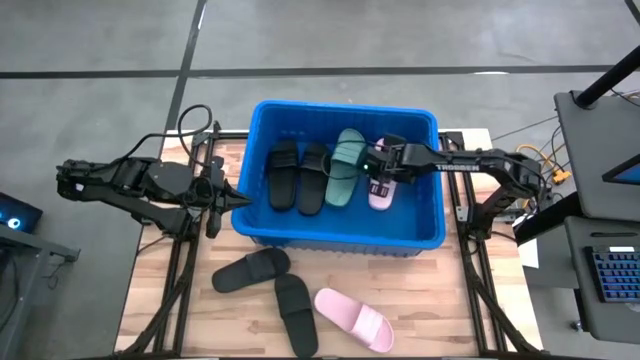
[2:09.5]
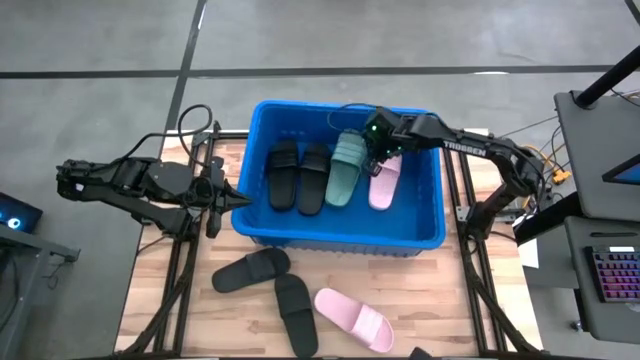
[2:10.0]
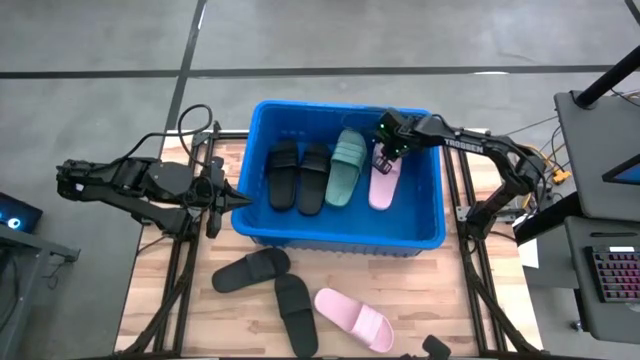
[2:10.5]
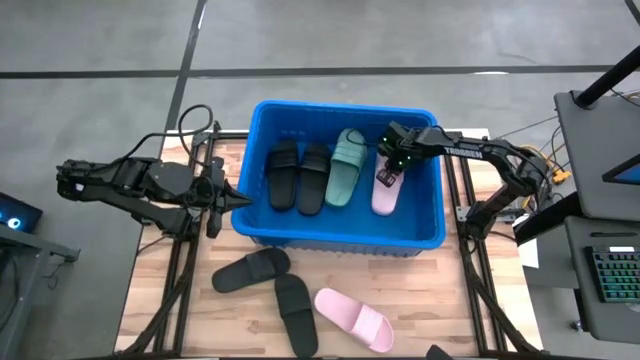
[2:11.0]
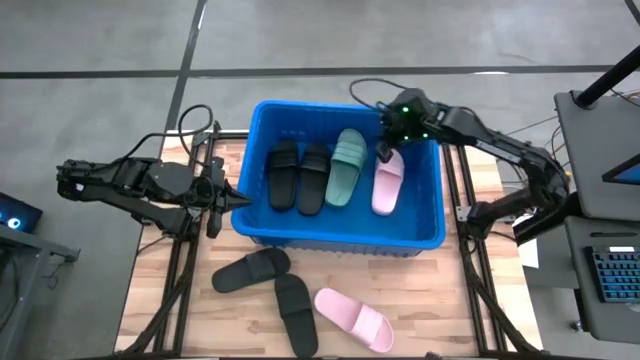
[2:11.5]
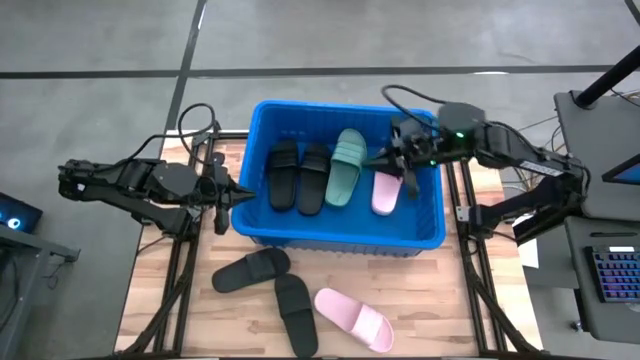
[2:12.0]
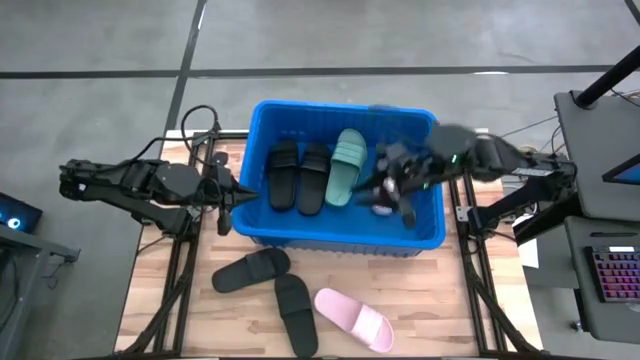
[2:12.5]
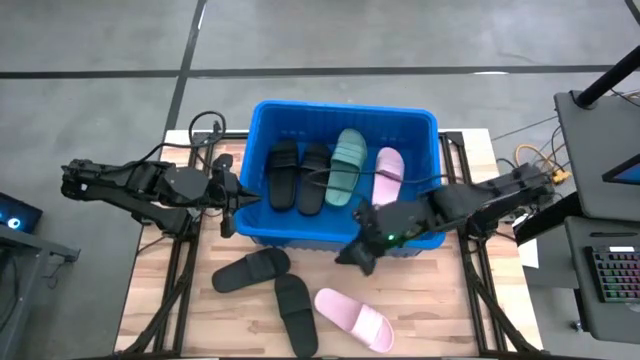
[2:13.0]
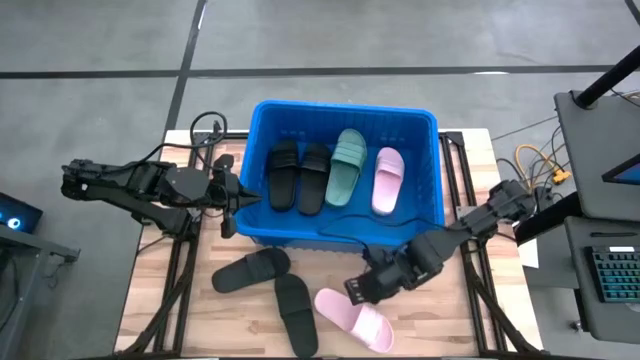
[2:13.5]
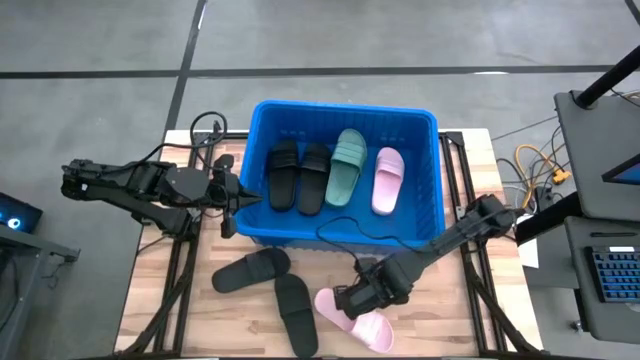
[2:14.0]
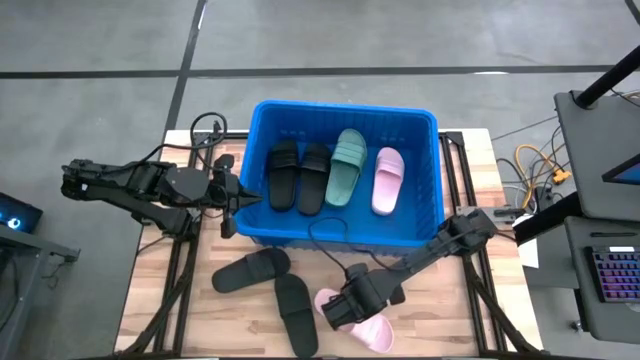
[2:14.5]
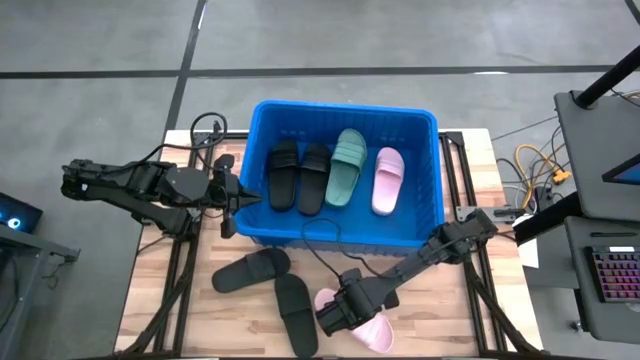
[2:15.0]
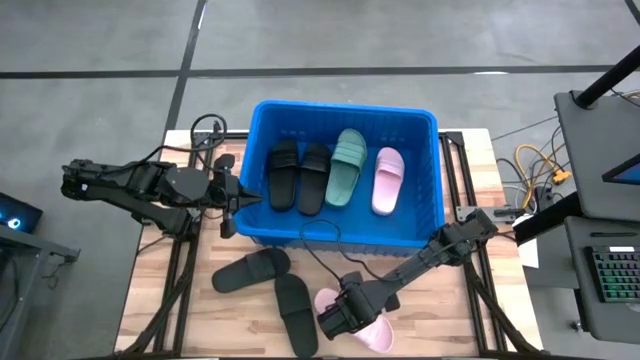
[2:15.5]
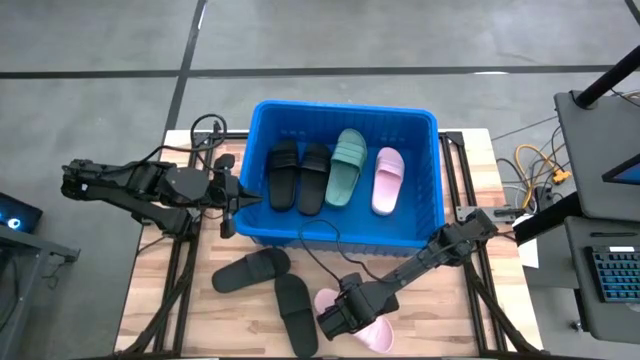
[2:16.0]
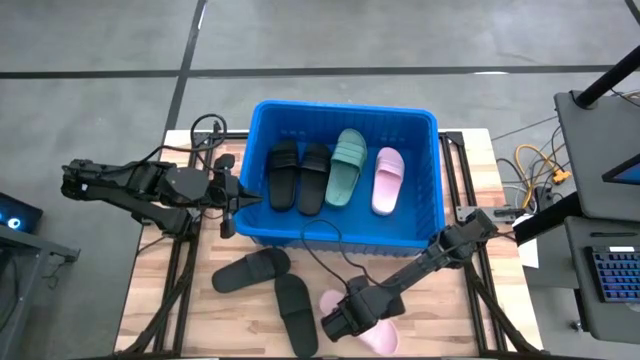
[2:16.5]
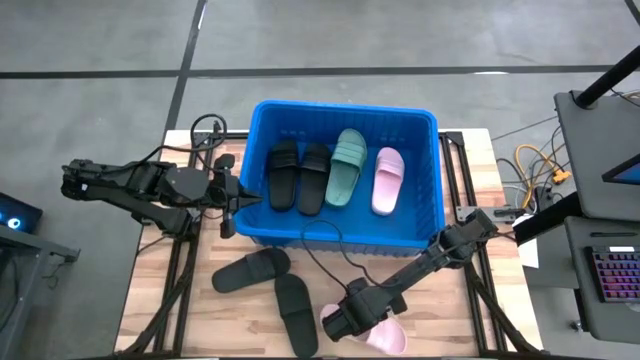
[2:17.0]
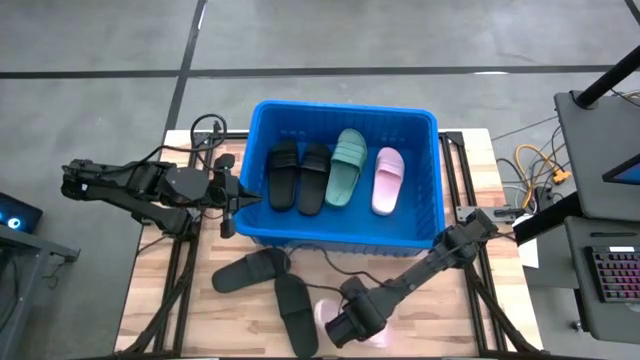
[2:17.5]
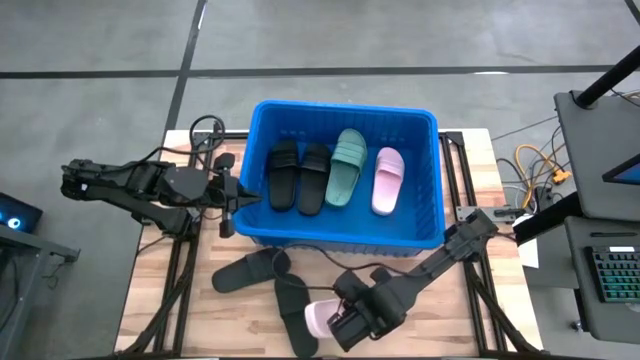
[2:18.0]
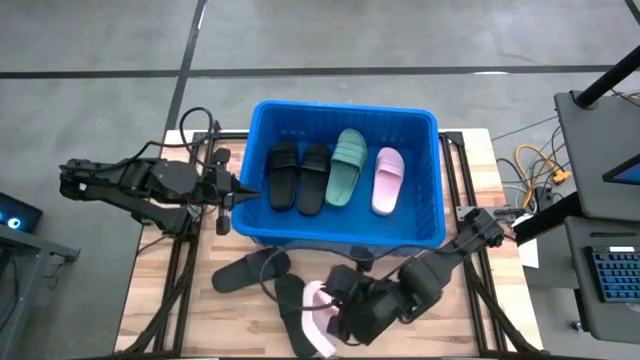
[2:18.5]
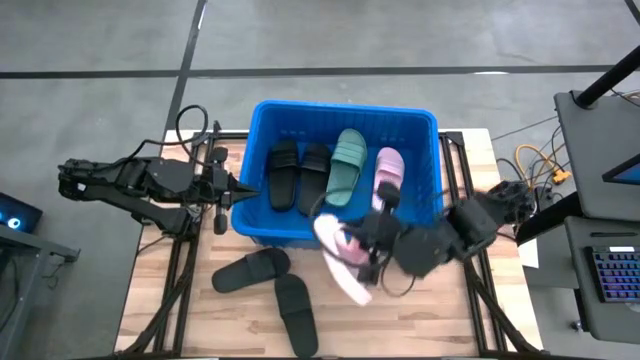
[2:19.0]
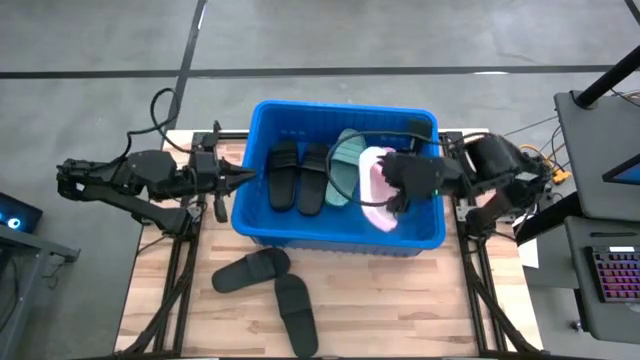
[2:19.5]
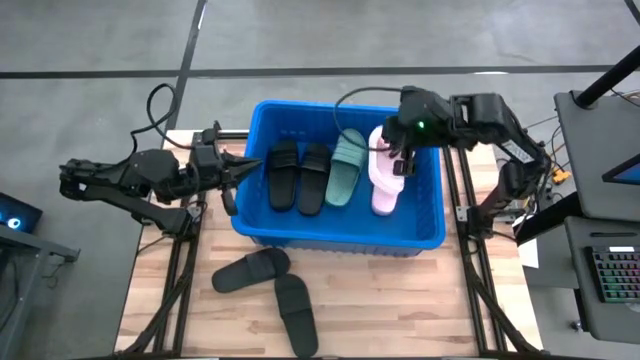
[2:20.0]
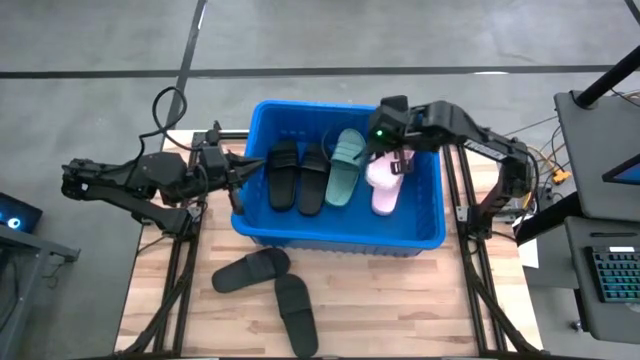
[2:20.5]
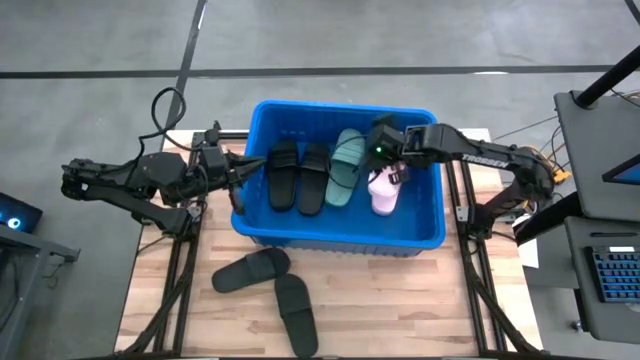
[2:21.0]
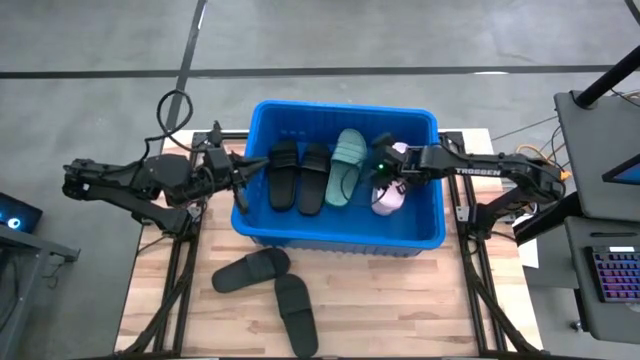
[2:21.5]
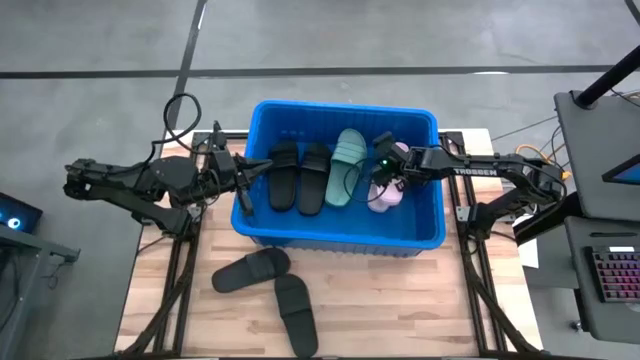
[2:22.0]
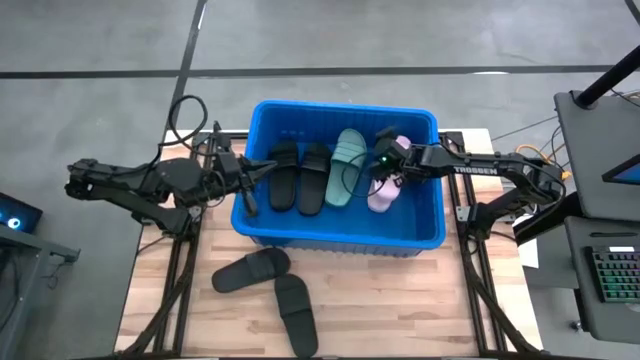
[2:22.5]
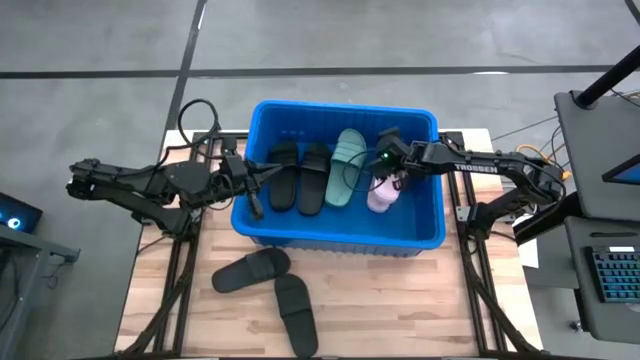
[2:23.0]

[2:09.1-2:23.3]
Task: Pick and place slides into bin
Stack the pink slide on top of the pink slide into the blue bin

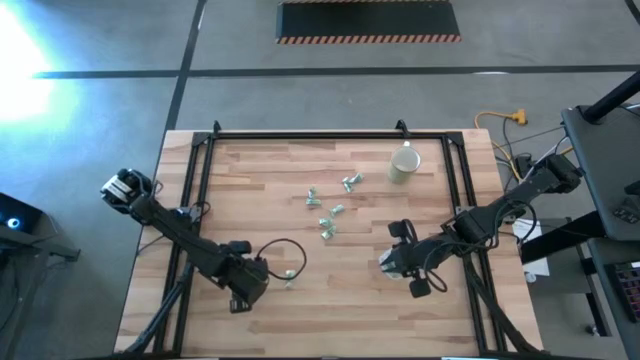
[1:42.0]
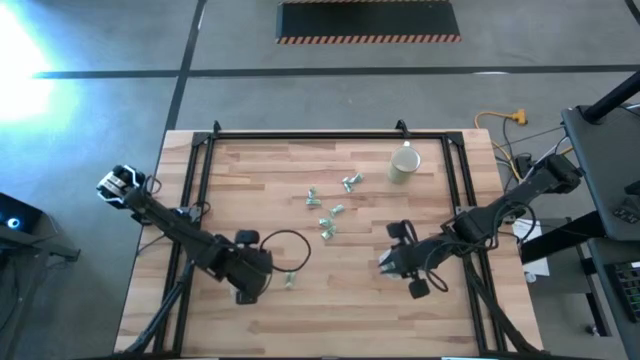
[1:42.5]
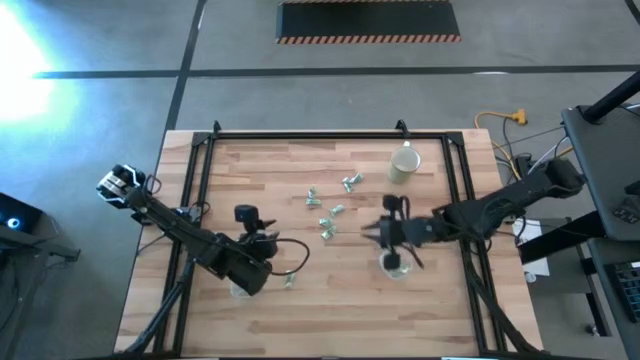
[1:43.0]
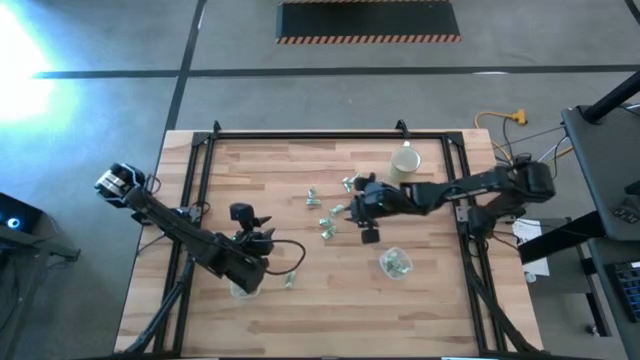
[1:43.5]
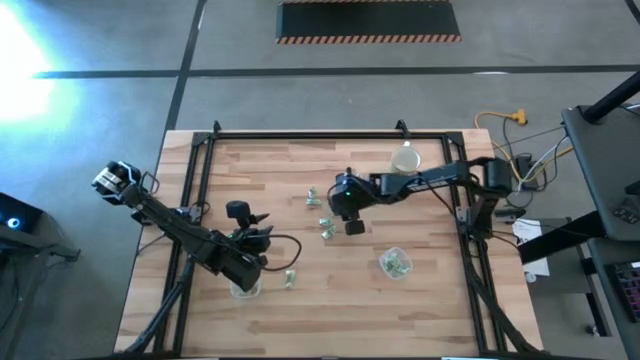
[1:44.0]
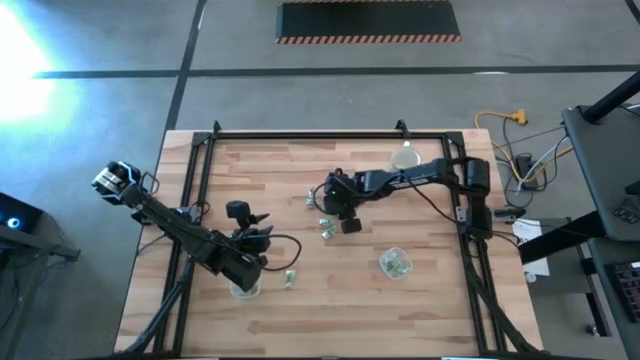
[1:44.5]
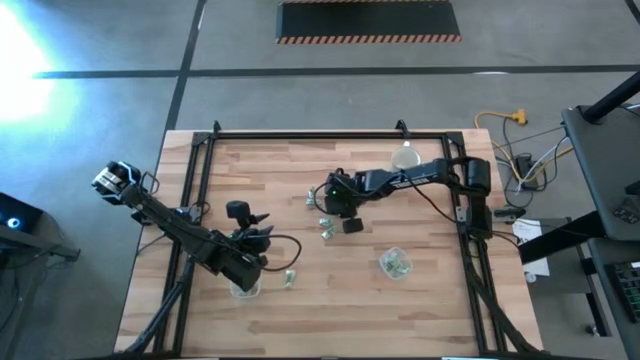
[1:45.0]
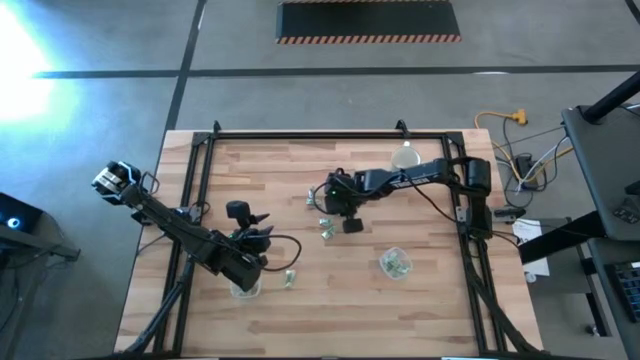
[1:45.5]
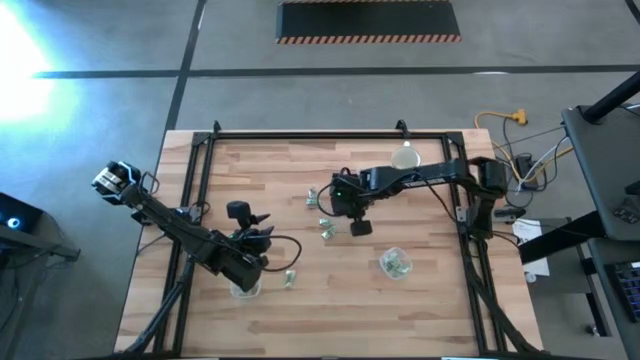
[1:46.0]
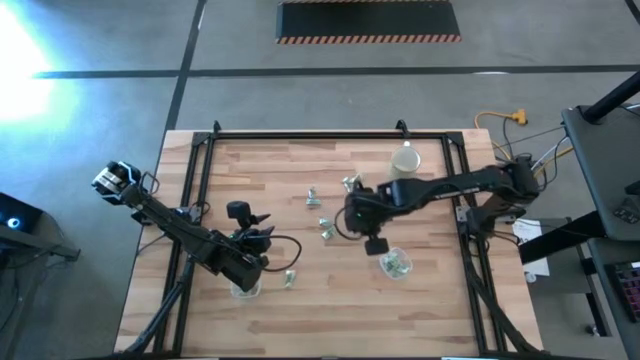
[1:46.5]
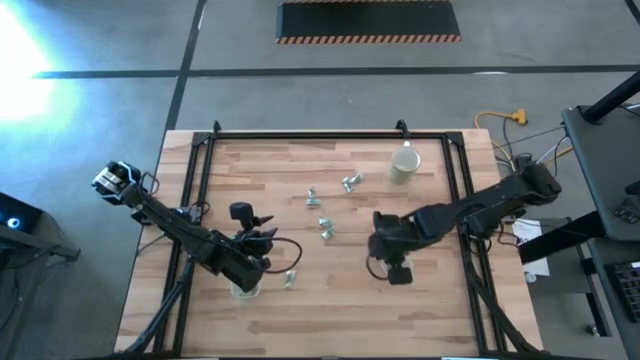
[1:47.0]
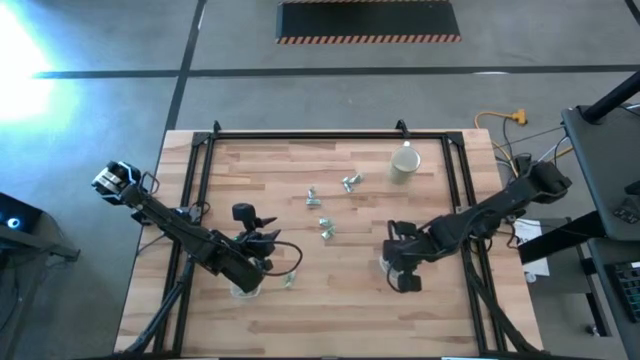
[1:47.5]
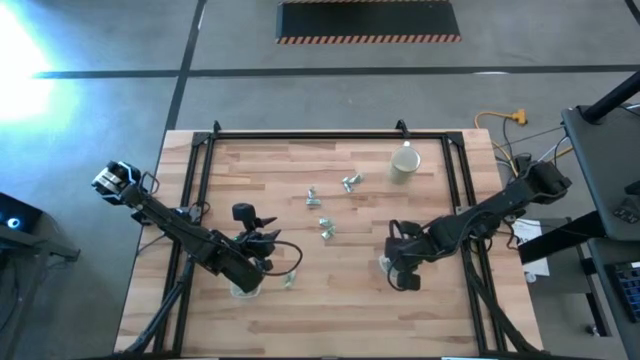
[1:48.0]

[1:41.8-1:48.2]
Task: Pick and place Stevia / Truvia into bins
Put the stevia packet into the right transparent container

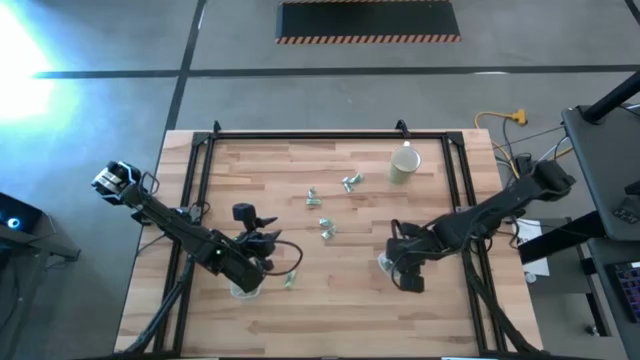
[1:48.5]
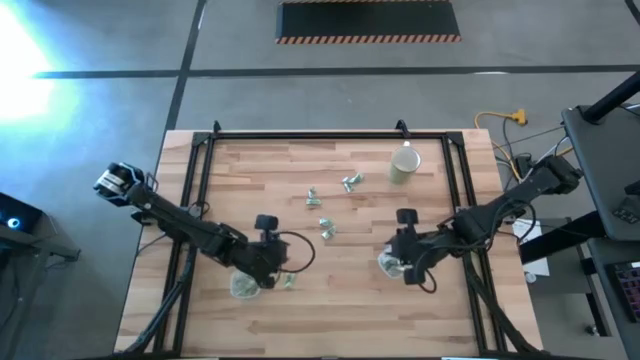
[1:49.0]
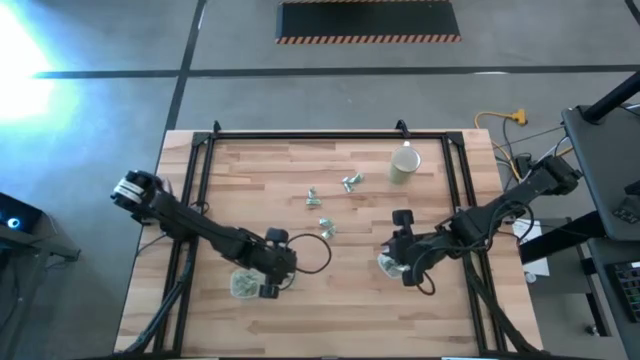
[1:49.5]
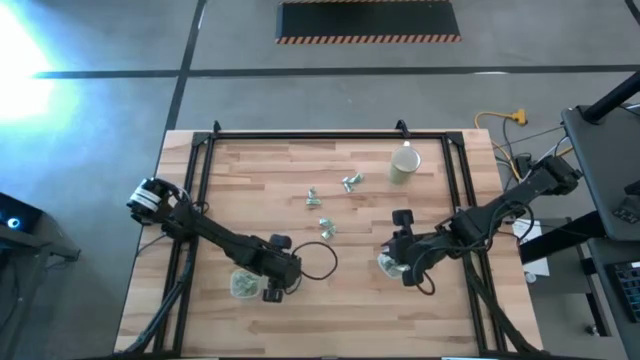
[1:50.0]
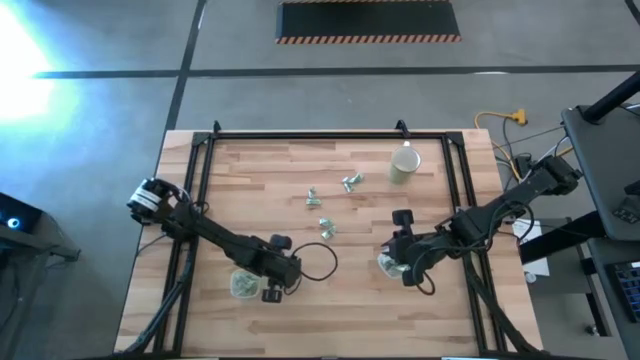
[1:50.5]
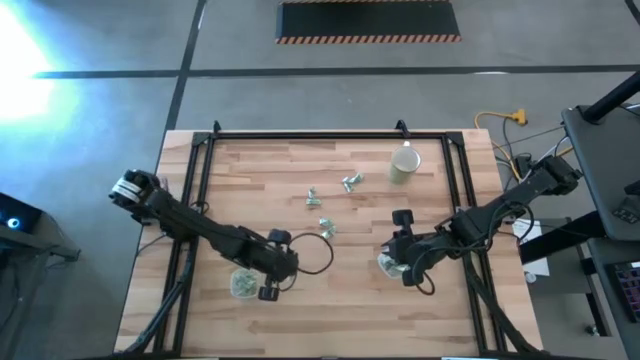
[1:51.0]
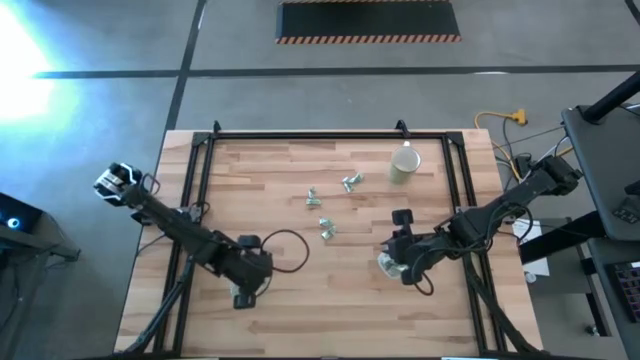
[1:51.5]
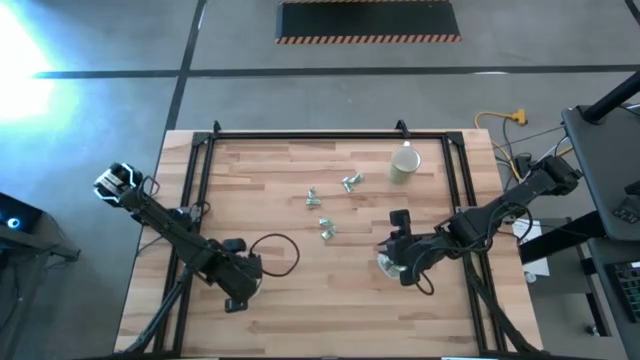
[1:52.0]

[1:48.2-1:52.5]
Put the stevia packet into the left transparent container
